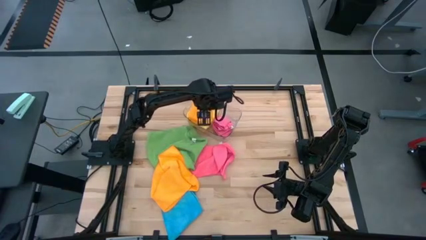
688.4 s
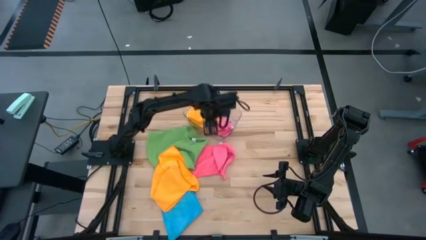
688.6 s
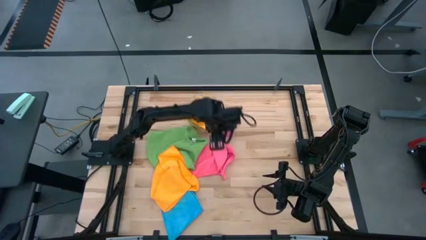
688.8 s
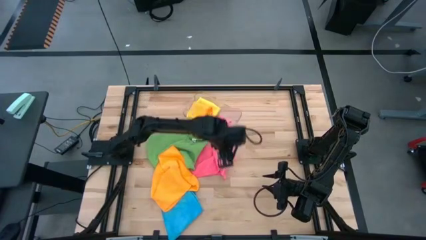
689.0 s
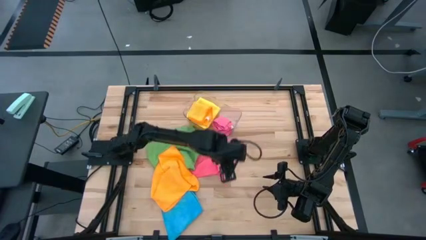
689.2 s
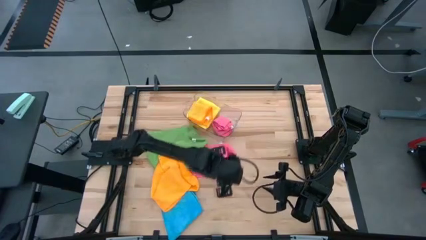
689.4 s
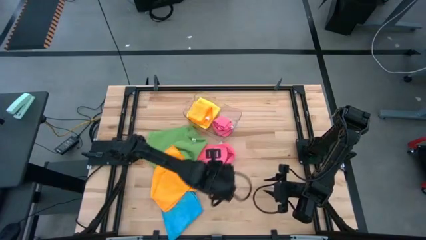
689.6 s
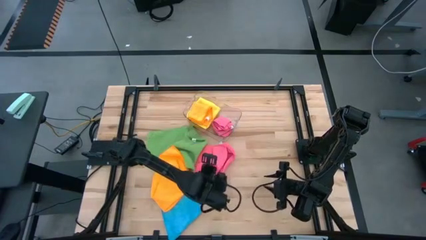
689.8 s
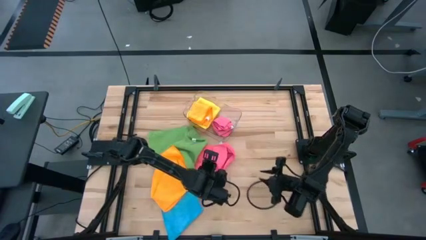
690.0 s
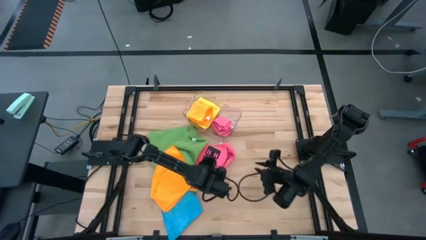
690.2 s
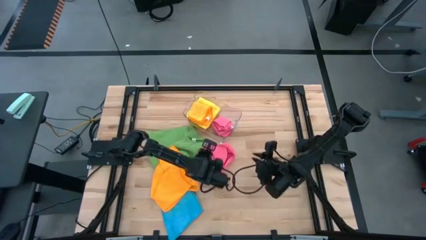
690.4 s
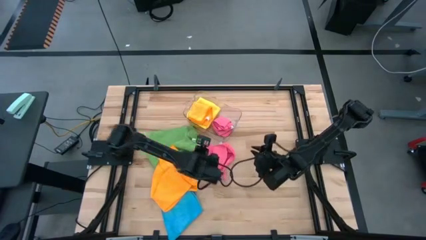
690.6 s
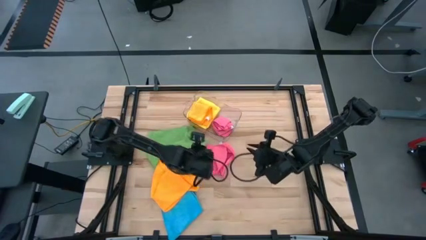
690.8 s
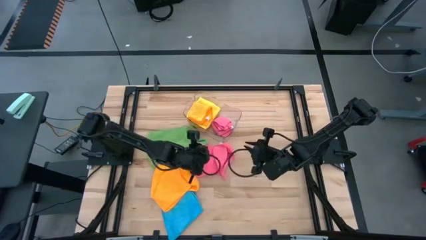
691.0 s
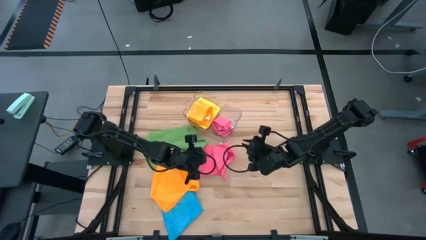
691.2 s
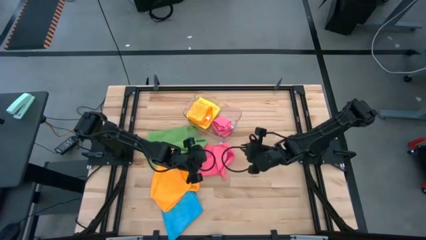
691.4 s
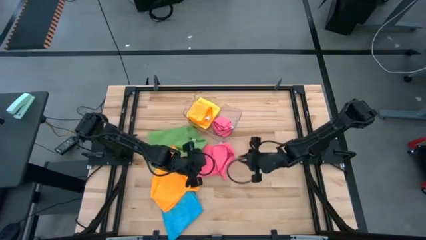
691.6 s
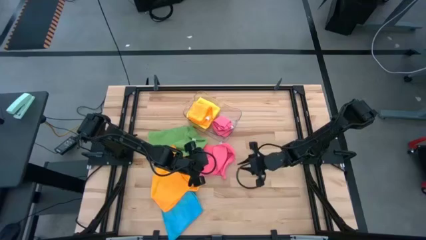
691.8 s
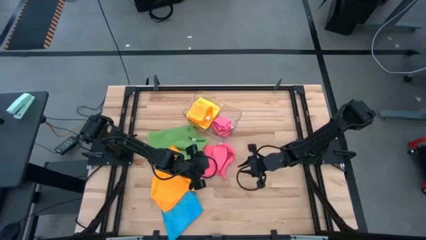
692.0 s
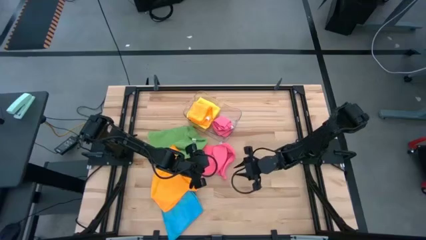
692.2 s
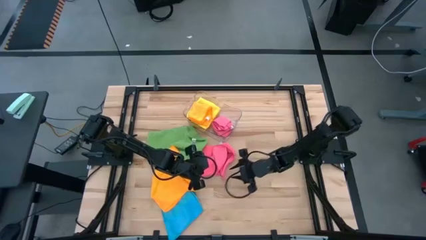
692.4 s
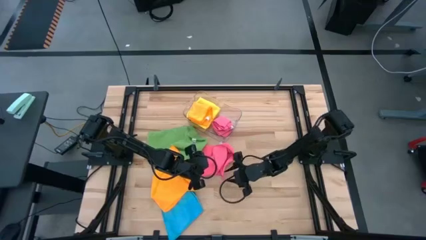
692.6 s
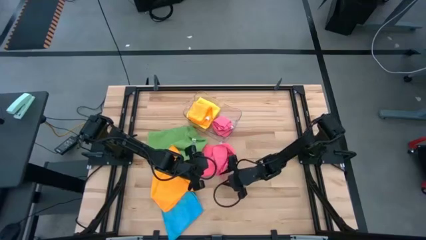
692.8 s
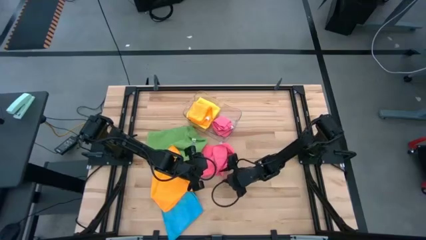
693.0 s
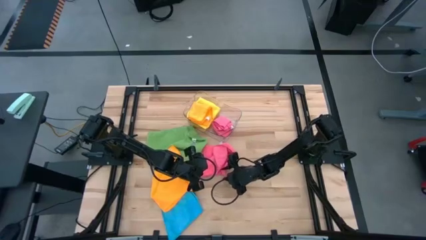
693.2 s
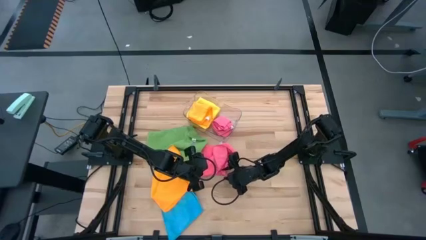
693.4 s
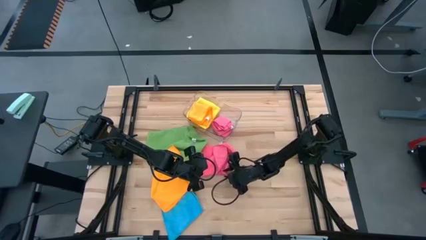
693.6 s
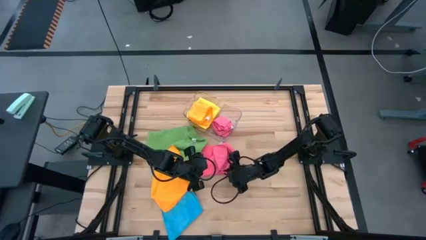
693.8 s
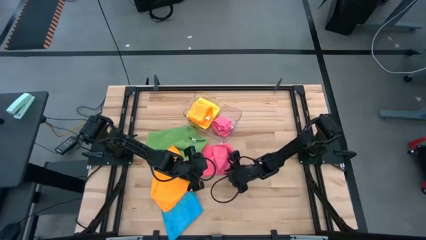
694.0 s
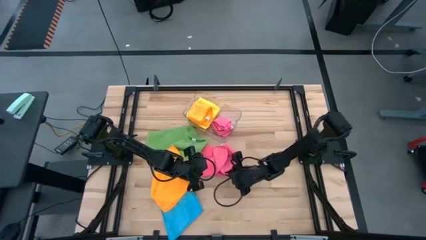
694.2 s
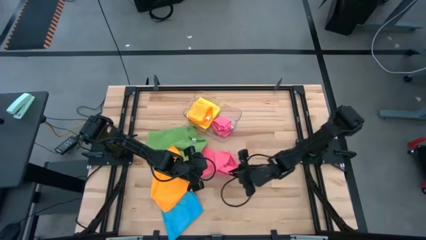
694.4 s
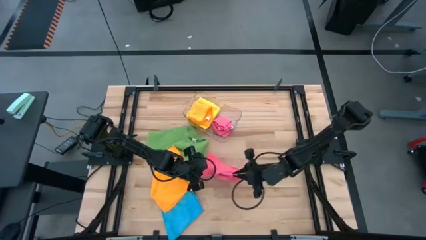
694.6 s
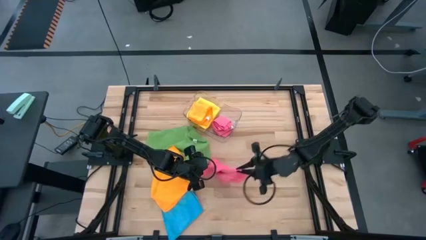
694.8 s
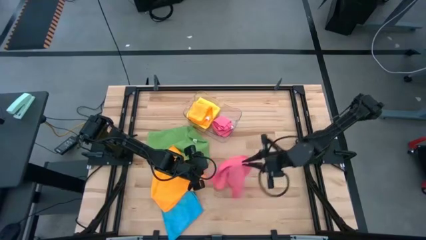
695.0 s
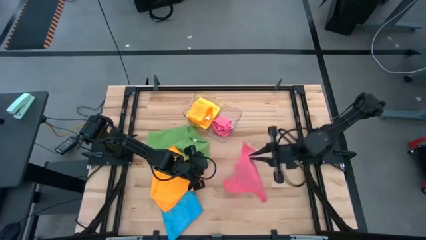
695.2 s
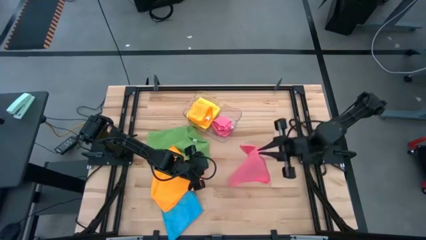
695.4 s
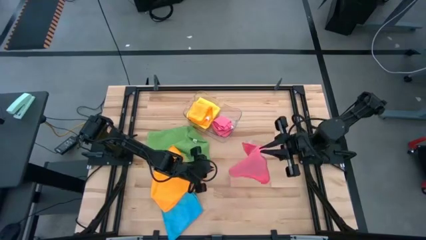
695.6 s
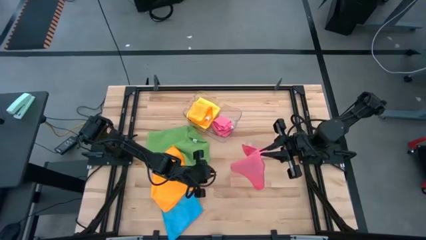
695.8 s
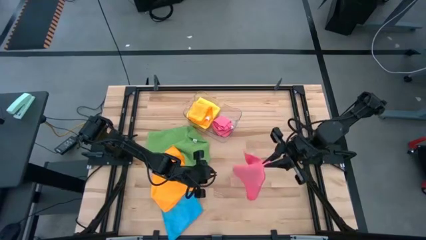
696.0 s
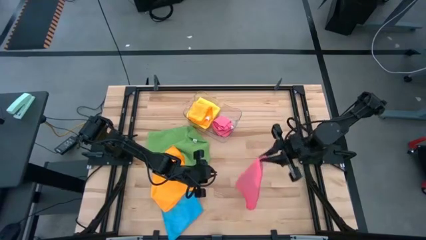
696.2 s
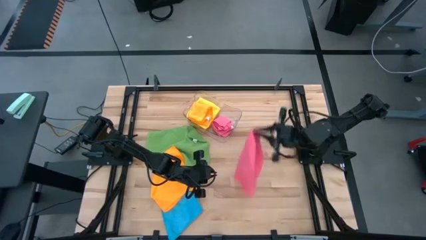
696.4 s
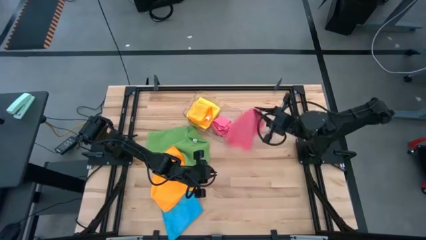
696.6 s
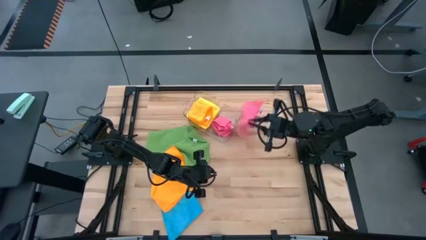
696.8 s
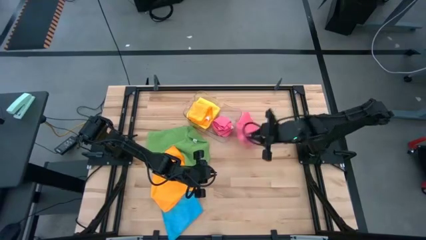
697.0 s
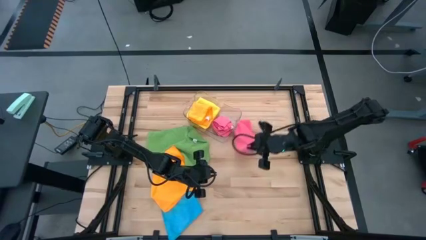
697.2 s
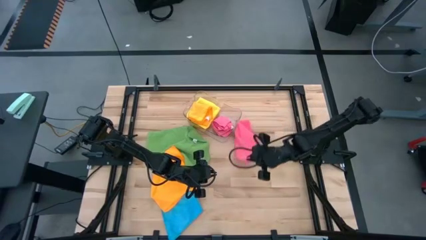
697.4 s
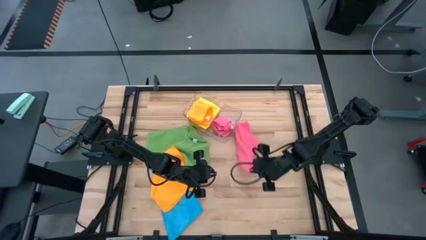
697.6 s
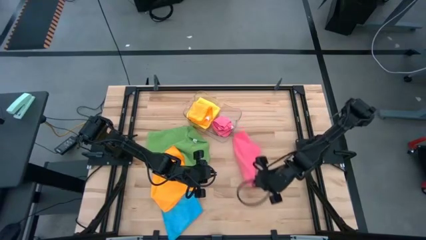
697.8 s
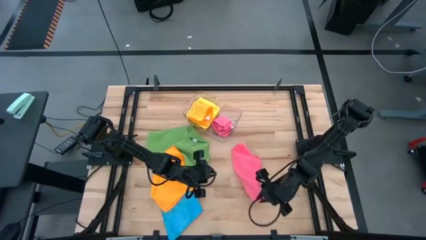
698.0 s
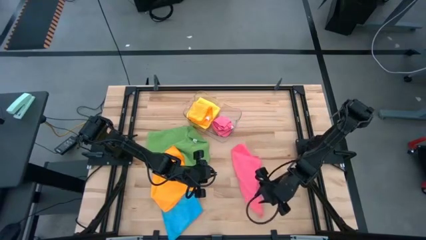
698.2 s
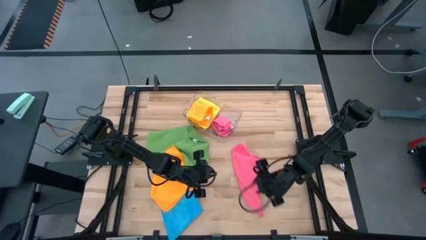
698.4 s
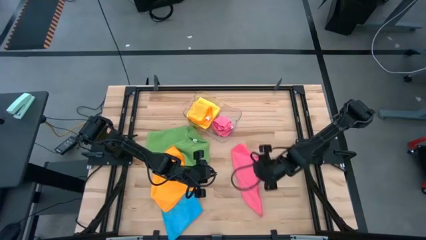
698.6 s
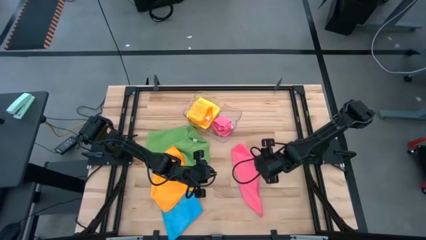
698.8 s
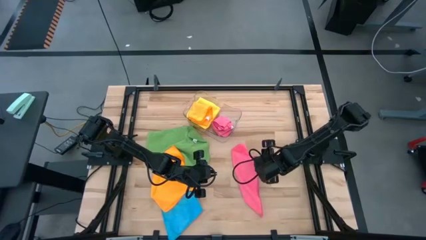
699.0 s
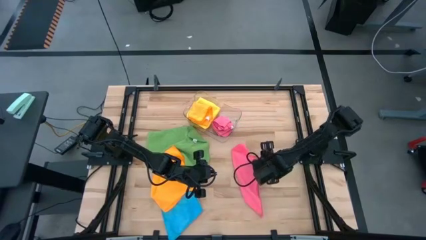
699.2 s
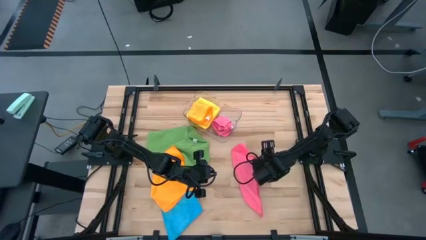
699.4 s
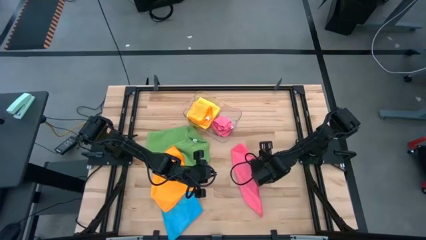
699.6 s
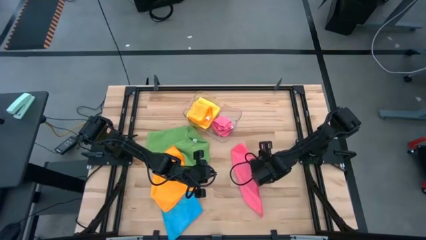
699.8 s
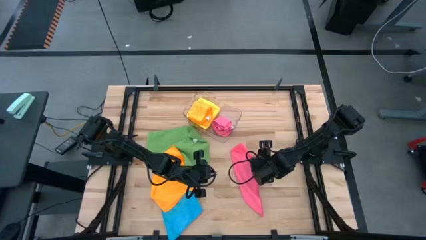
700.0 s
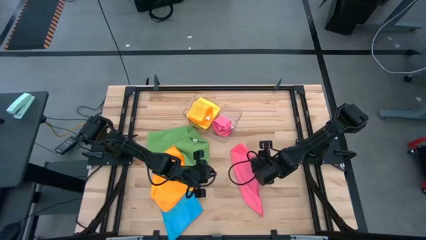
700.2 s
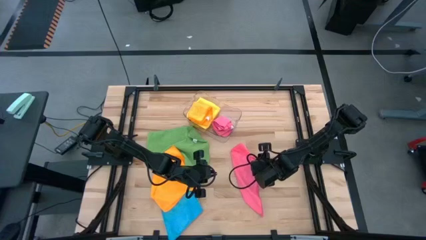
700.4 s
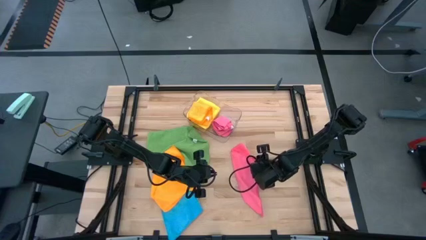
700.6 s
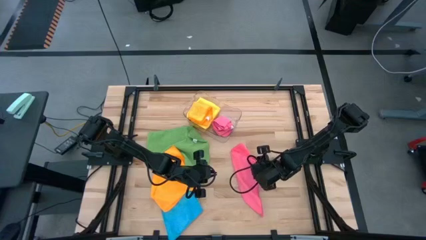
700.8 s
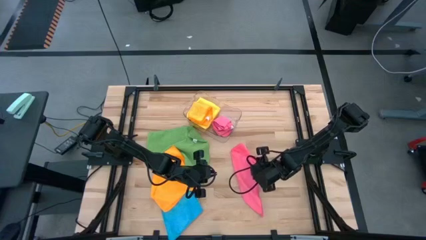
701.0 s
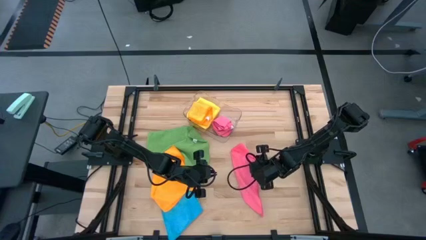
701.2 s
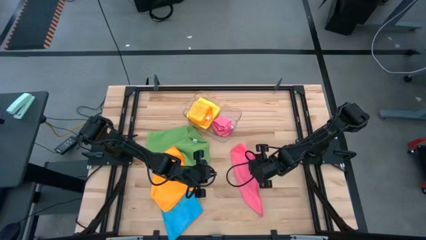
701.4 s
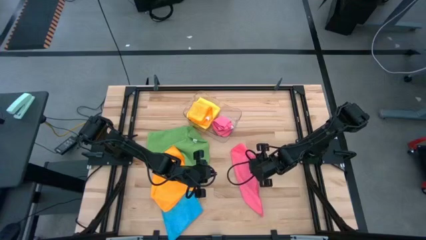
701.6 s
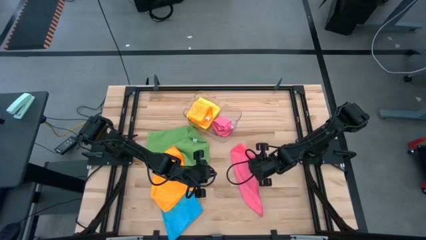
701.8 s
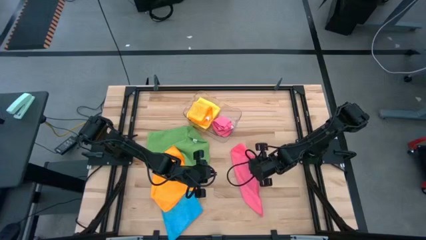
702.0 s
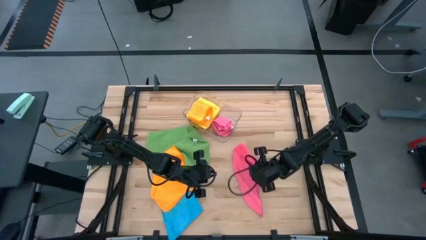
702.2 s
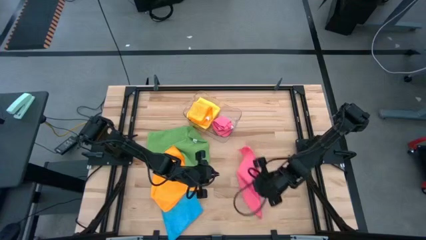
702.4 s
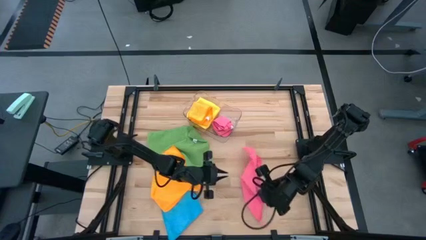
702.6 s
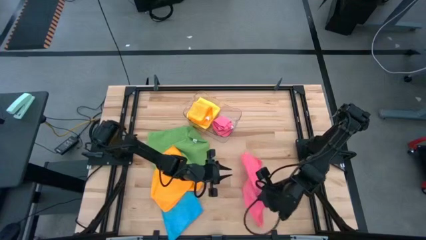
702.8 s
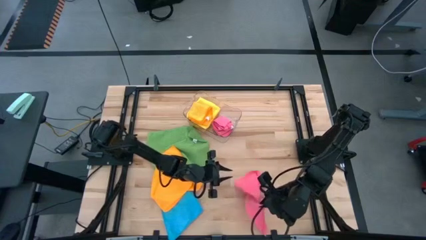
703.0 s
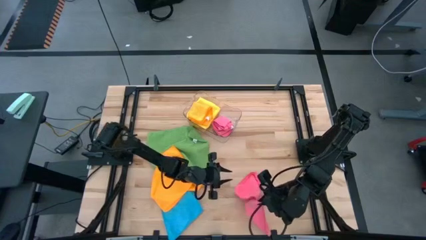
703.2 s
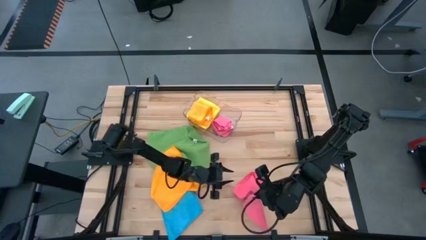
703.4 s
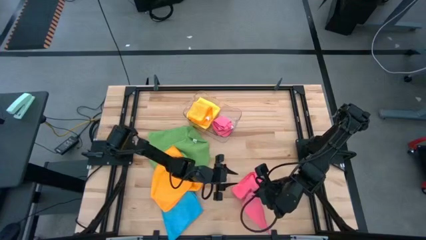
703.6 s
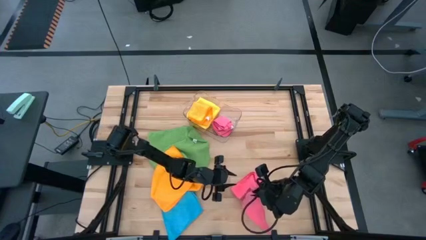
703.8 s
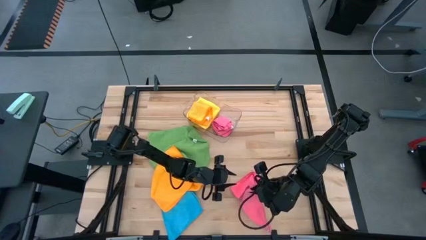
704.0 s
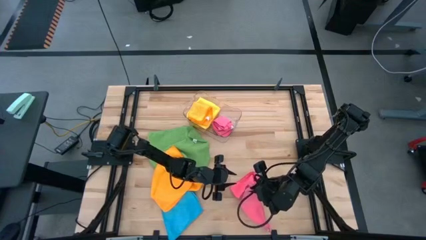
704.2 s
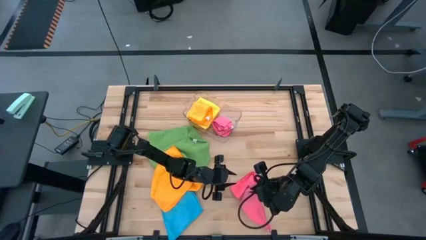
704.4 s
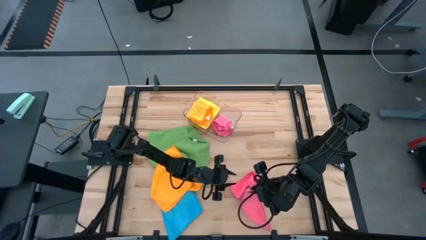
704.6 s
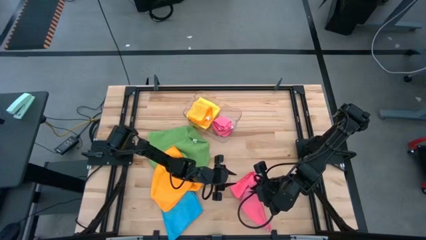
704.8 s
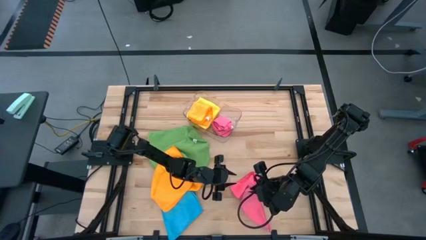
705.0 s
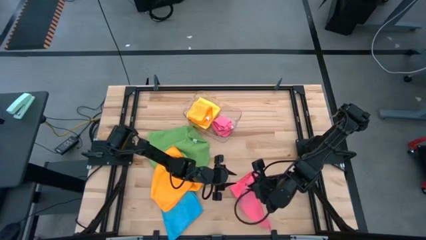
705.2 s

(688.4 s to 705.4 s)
Task: Fold microfiber towels
Fold the pink microfiber cloth
